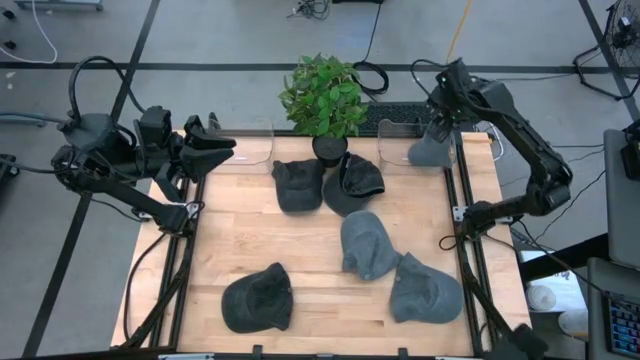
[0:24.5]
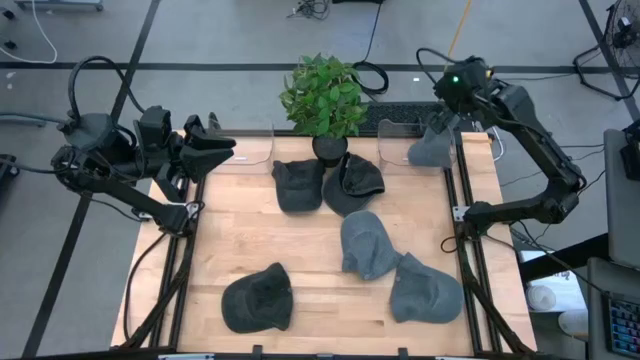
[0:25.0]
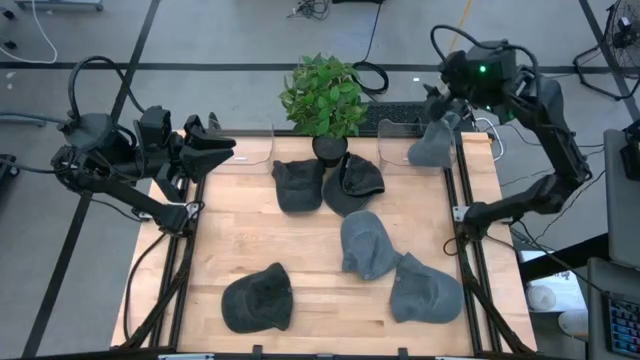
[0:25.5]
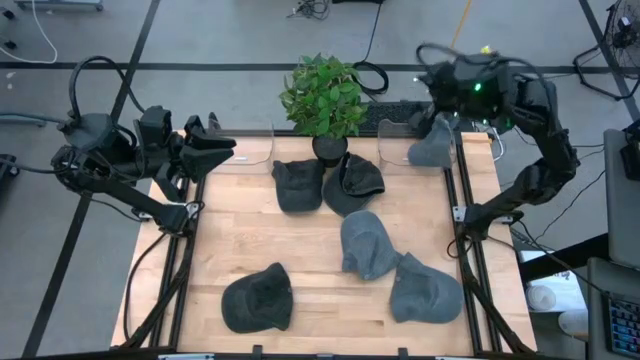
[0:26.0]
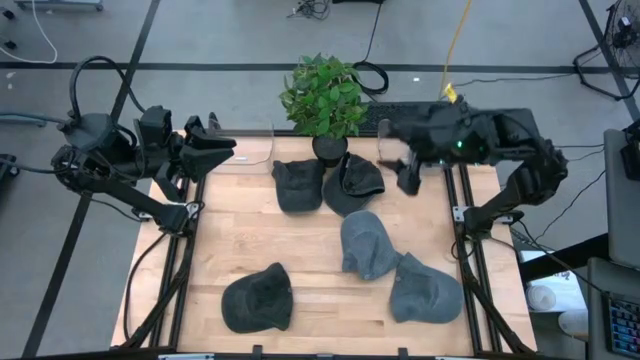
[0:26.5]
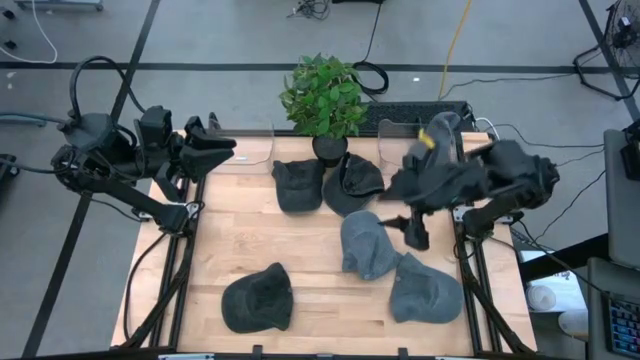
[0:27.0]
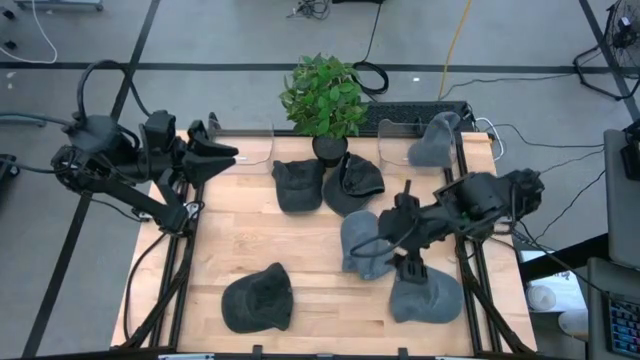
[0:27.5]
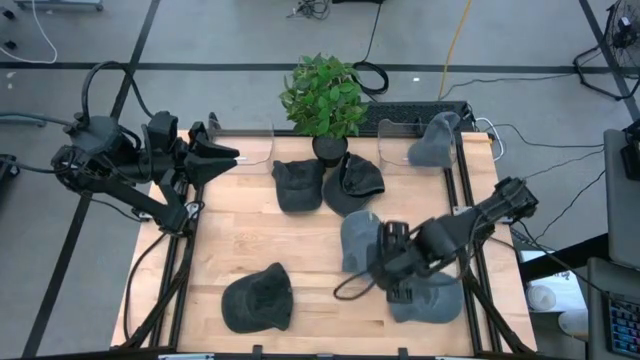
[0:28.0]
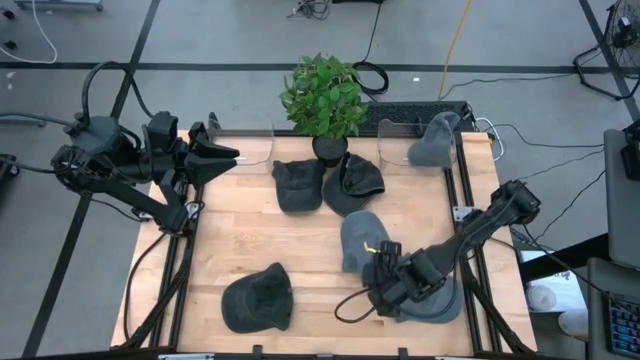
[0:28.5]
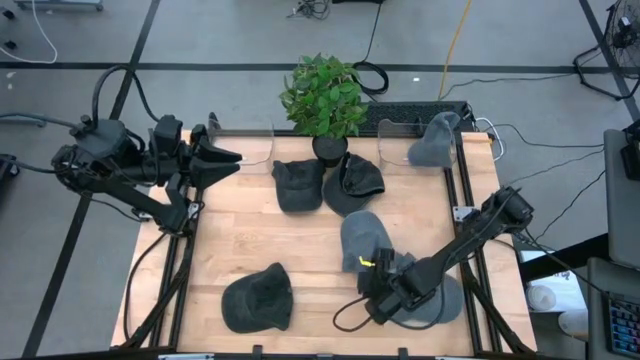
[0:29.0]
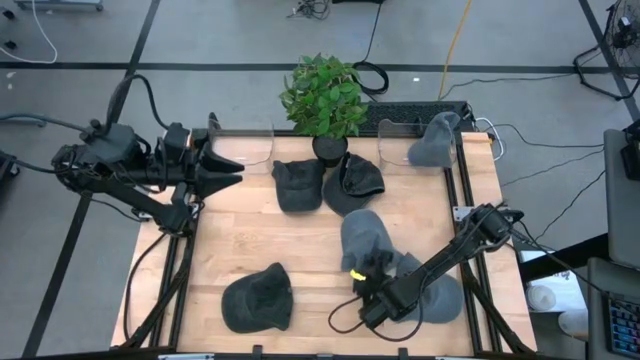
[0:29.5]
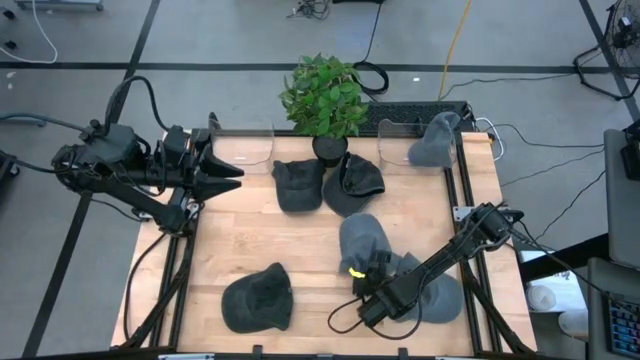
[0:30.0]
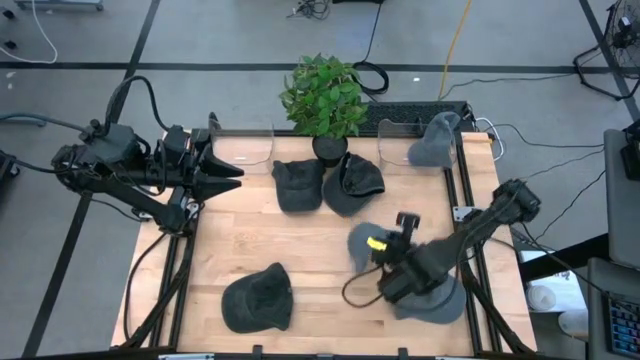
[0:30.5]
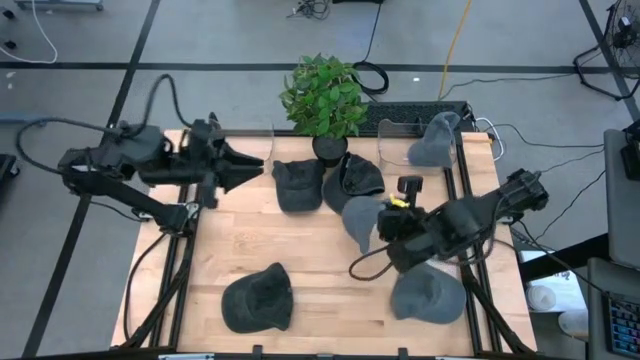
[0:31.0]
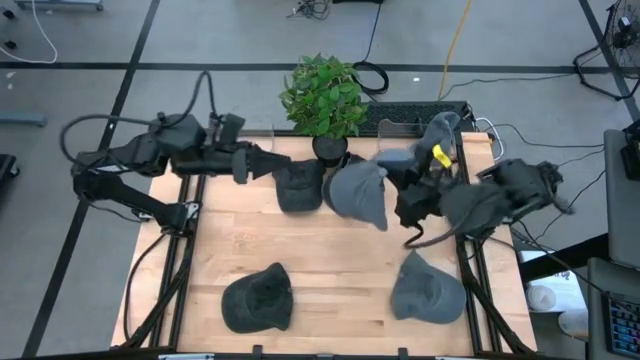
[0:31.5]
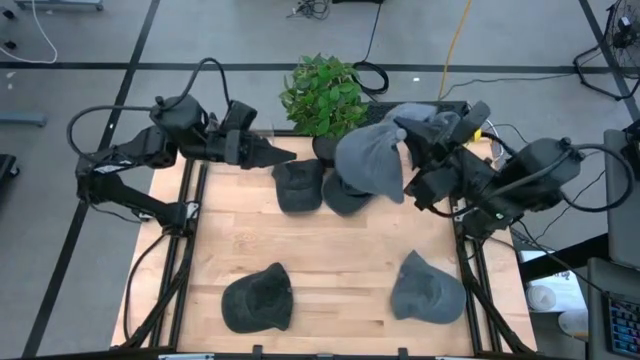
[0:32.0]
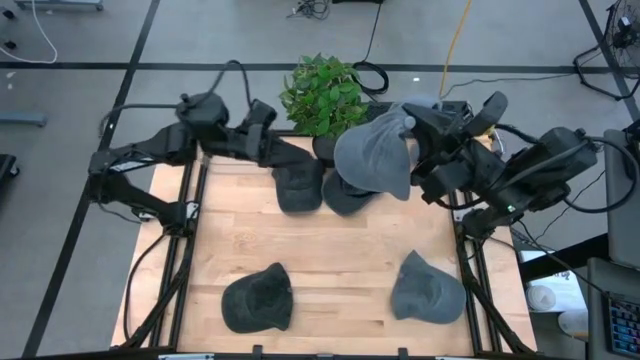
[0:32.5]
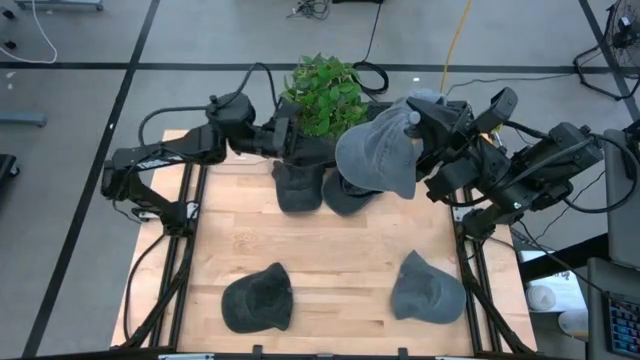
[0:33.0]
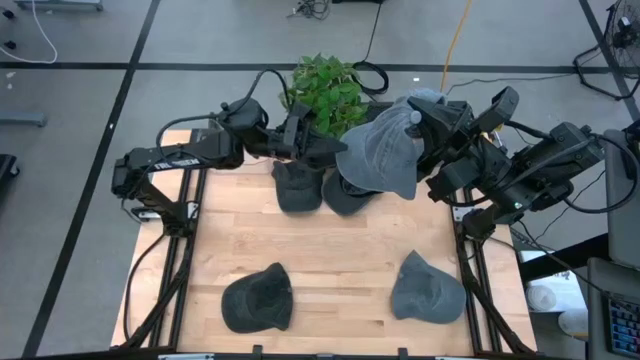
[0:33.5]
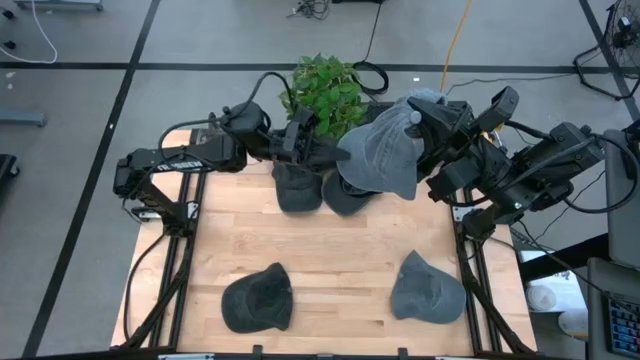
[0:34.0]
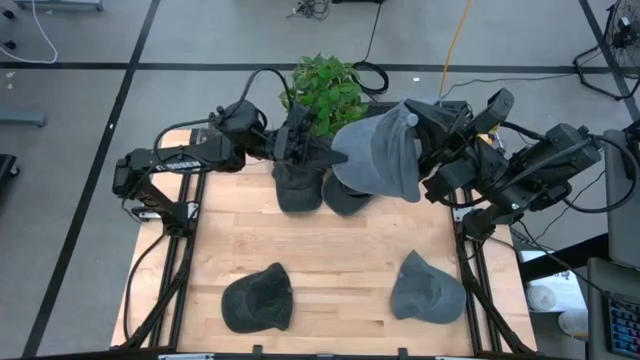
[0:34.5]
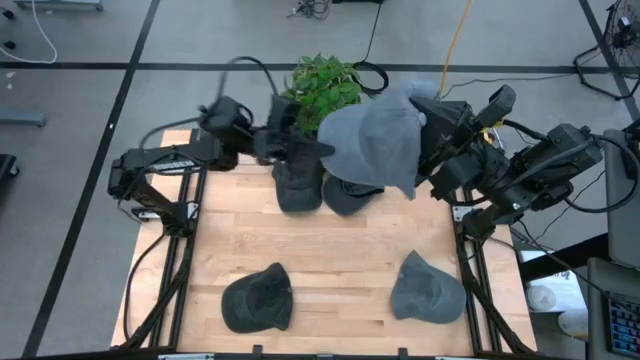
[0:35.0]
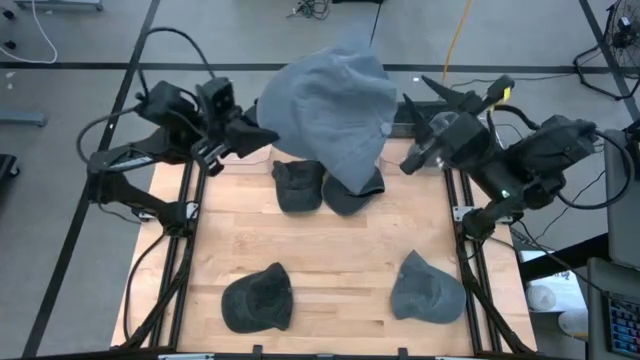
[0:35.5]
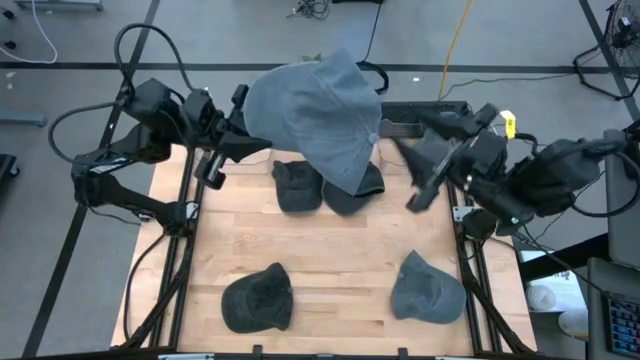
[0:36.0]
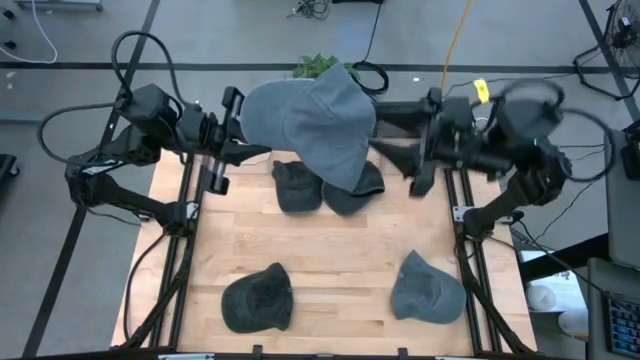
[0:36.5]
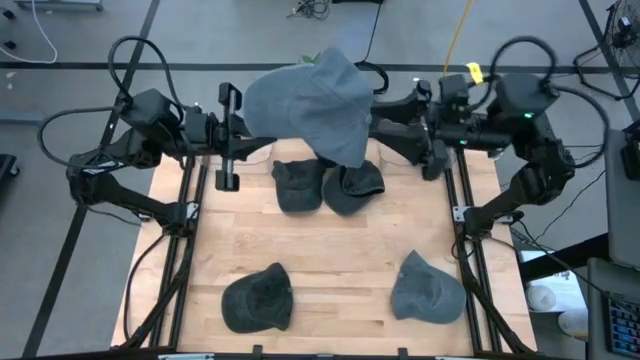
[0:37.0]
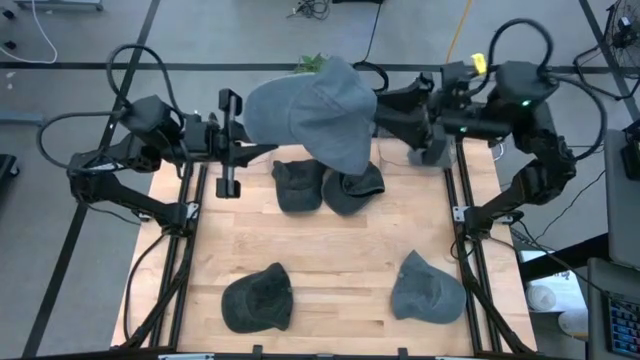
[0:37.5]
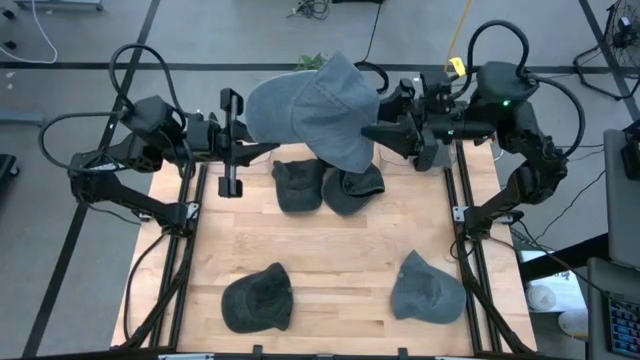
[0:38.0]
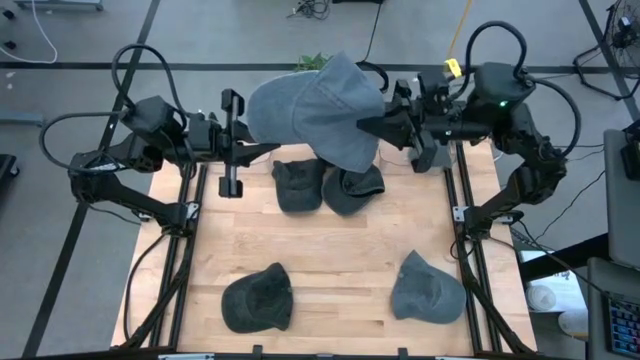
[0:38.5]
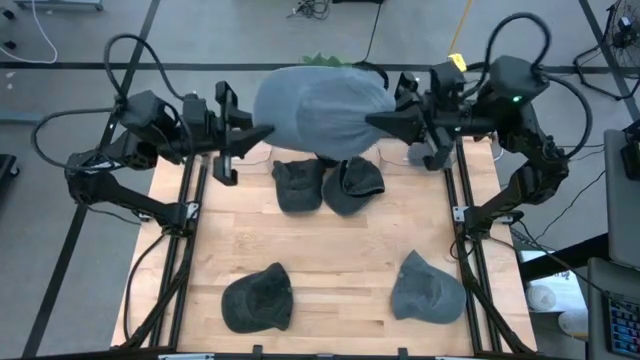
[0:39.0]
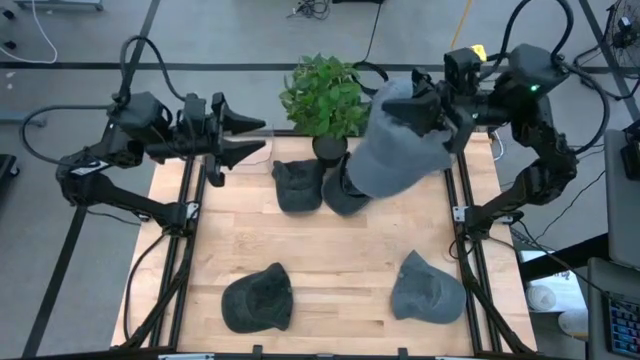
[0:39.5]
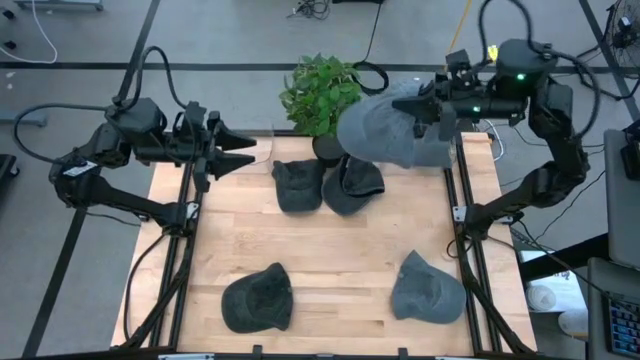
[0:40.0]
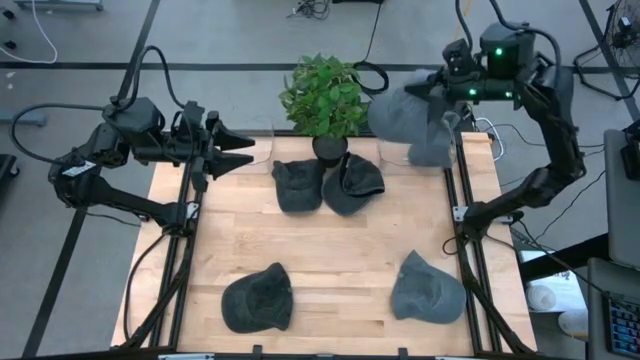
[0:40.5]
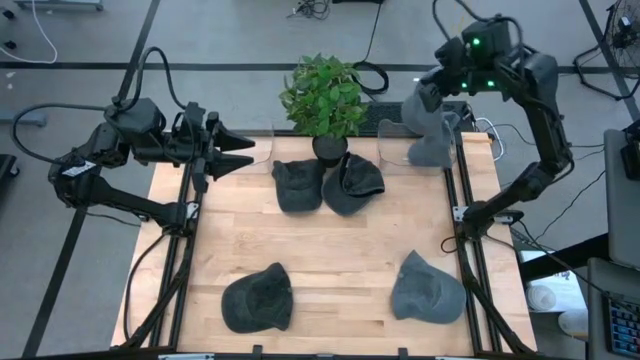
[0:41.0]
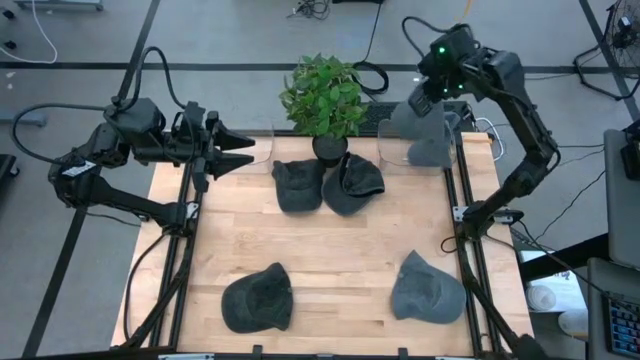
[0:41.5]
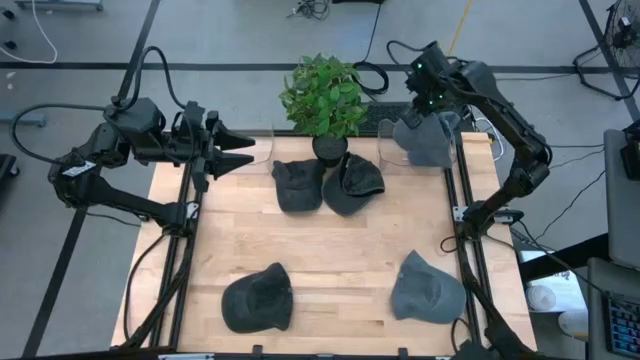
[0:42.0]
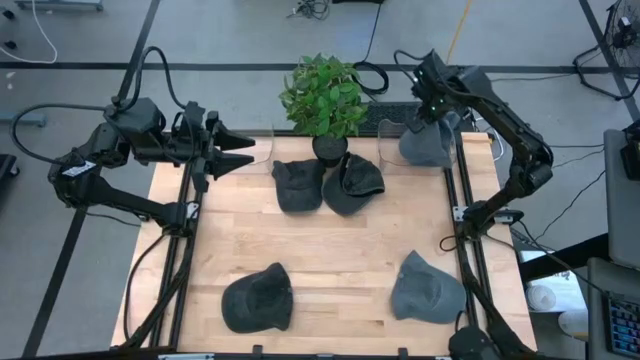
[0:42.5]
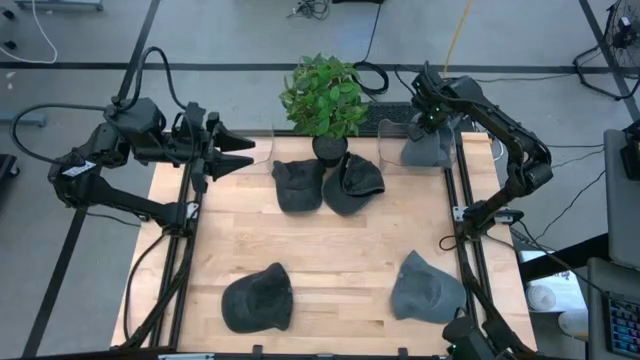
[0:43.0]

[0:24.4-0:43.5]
Task: Pick & Place hat
Put the top gray cap into the right transparent bin
